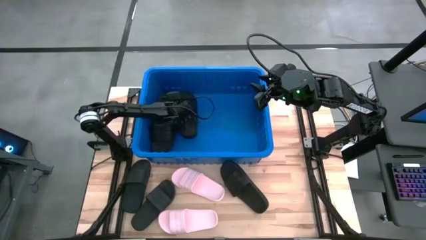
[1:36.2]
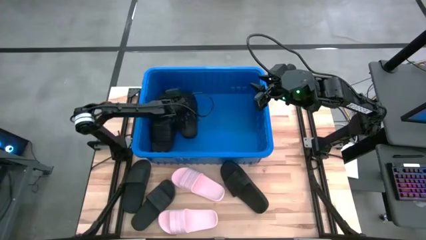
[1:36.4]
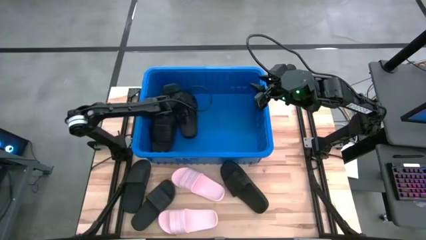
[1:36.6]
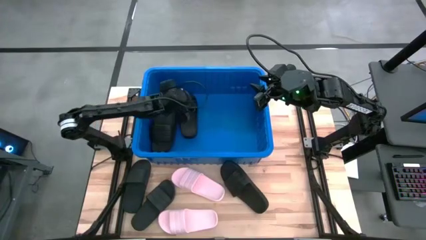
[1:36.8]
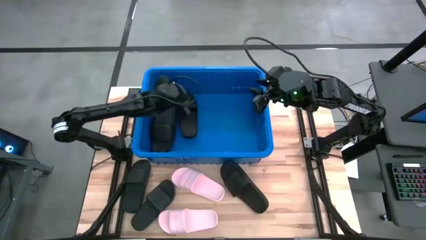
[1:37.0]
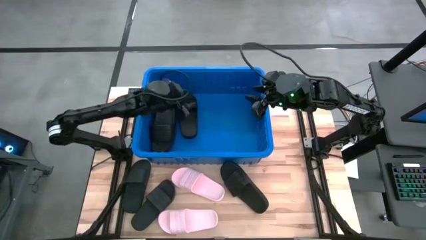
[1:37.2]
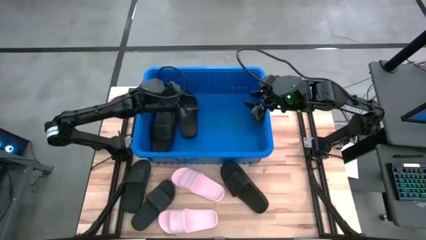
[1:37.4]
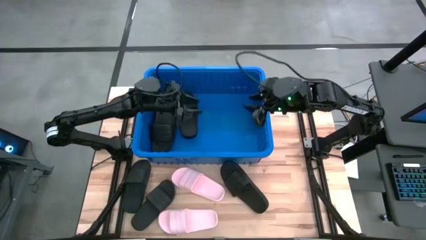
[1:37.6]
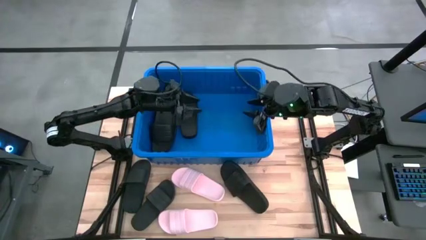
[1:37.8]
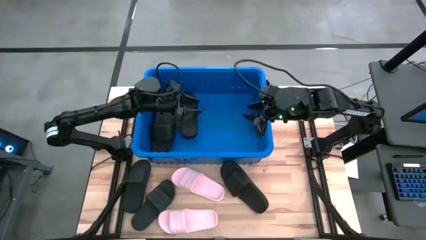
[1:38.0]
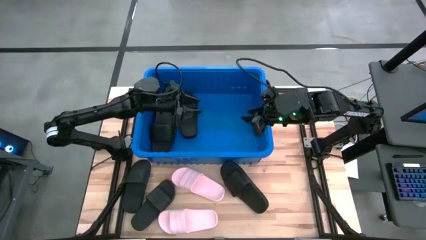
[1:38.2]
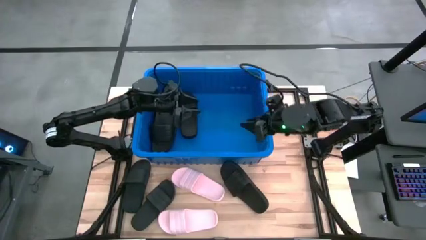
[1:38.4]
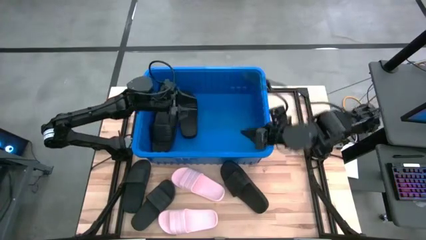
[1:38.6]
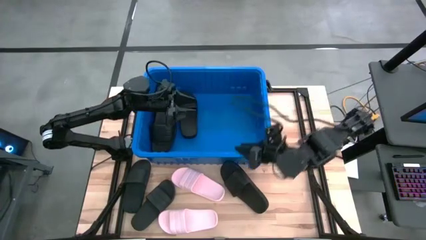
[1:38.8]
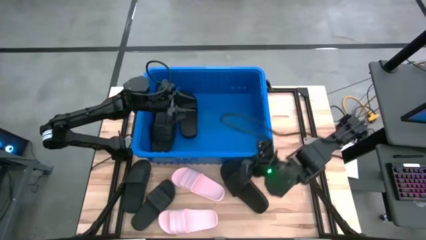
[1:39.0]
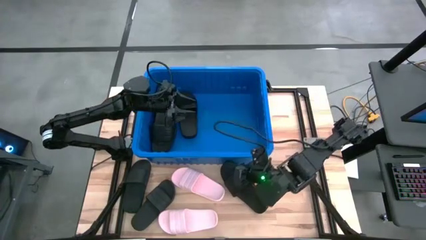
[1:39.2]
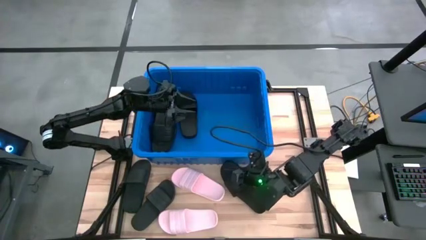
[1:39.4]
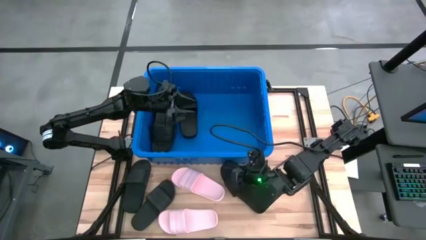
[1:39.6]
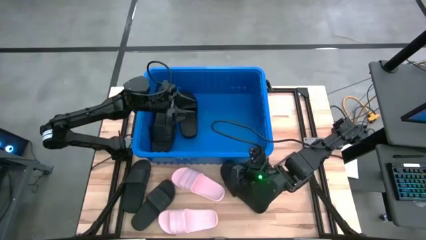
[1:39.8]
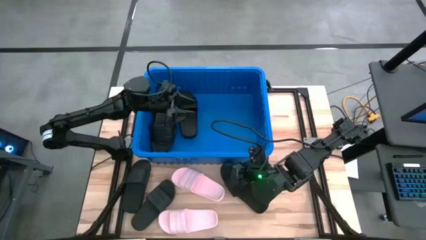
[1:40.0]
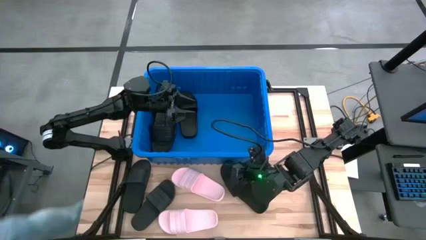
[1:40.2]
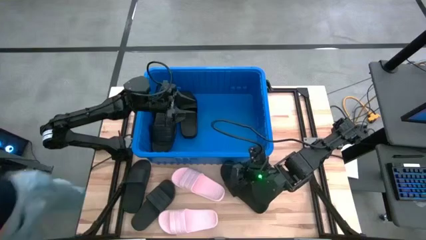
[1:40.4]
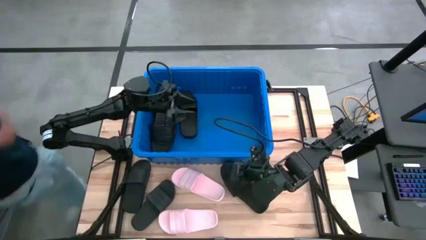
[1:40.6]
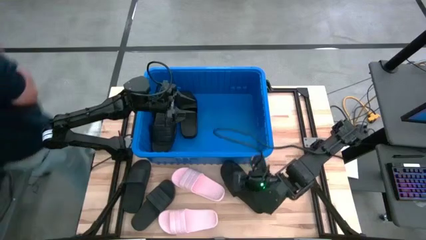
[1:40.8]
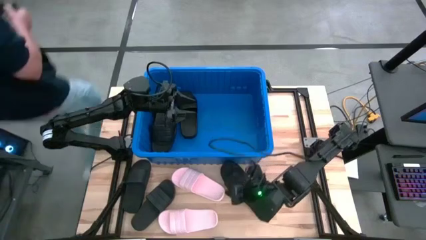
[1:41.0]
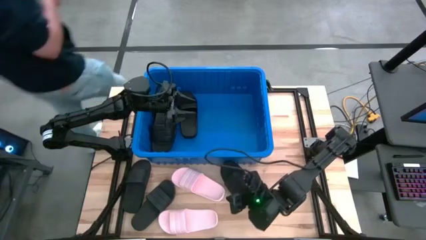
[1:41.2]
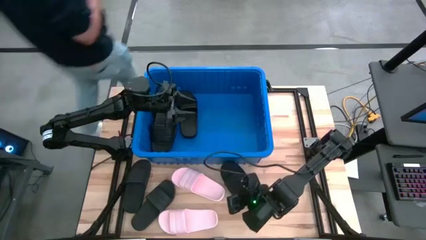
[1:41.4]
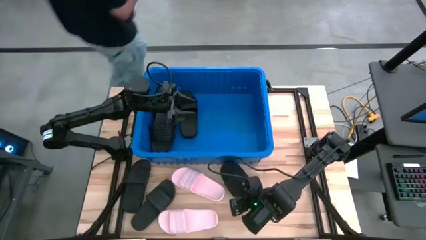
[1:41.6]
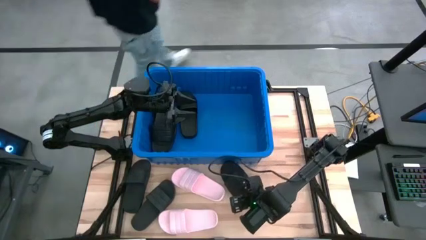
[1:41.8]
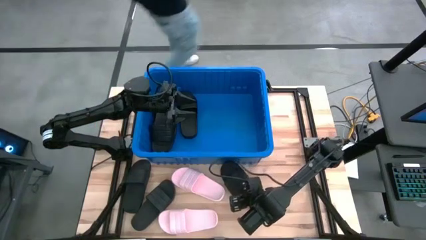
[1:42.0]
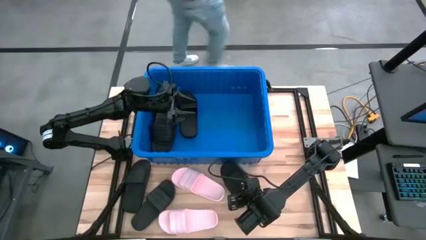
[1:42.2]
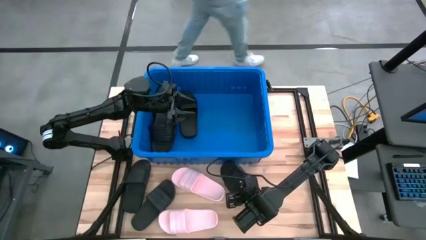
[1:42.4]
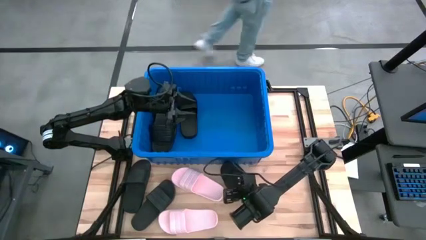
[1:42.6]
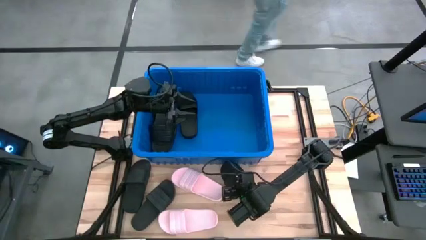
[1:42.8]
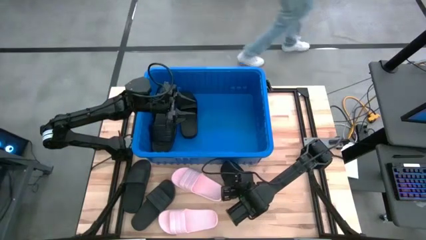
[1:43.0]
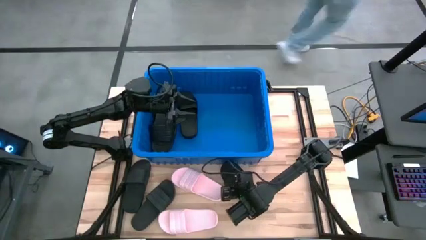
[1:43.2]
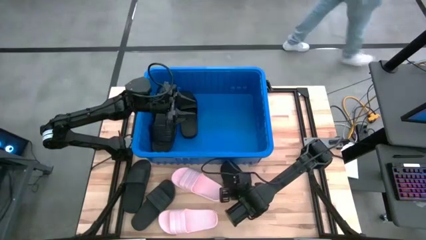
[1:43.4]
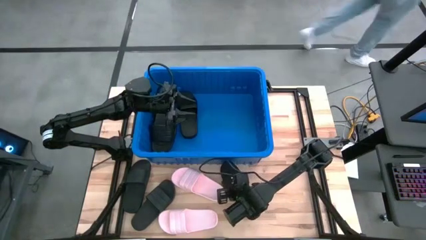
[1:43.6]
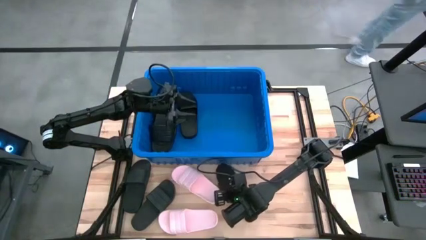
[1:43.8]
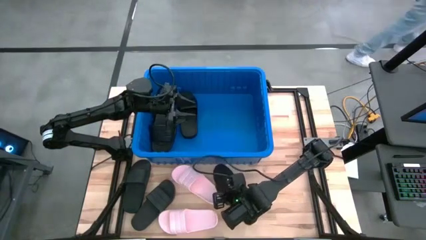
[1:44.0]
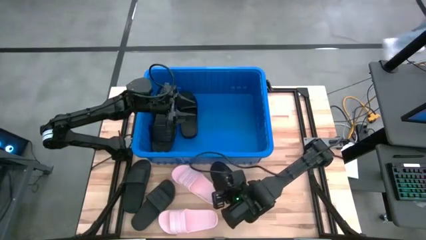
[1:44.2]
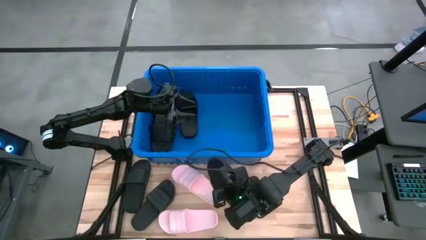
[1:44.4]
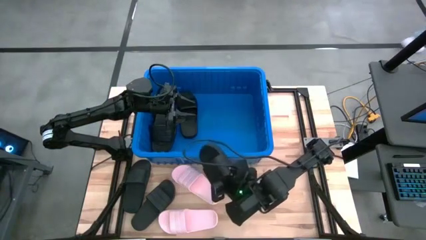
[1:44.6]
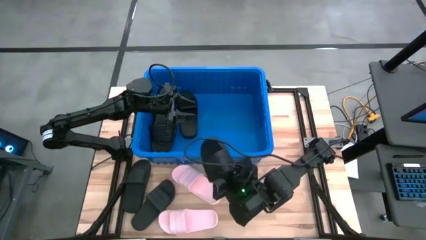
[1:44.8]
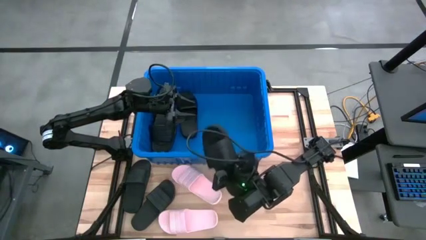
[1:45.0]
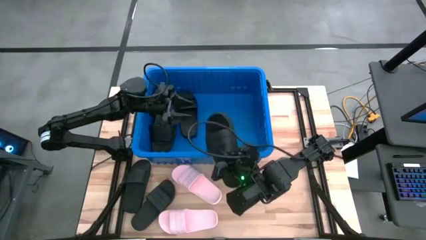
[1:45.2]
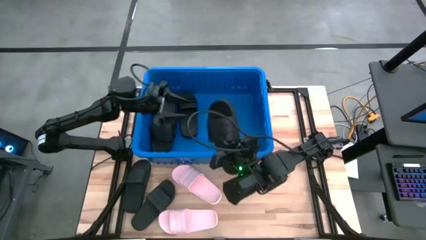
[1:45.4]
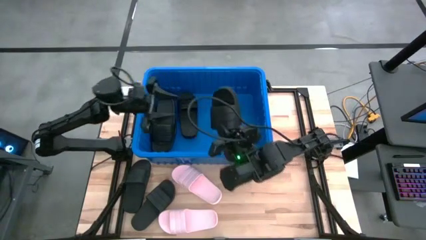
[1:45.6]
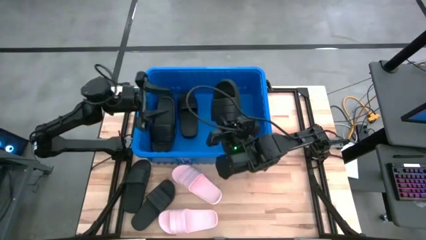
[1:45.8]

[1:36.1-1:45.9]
Task: Pick and place slides into bin
Stack the right black slide on top of the black slide into the blue container

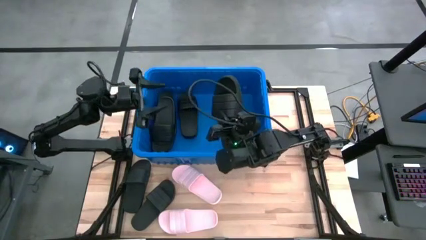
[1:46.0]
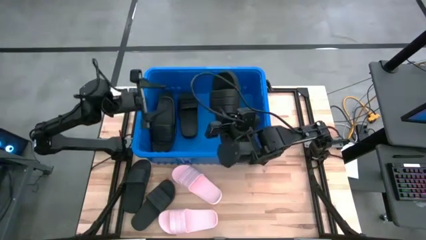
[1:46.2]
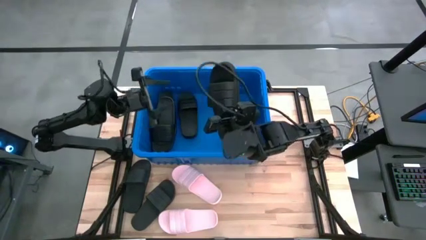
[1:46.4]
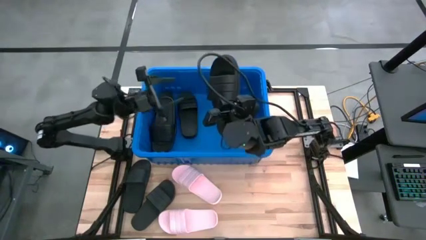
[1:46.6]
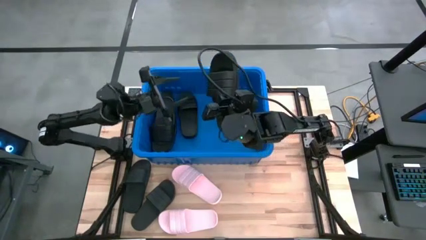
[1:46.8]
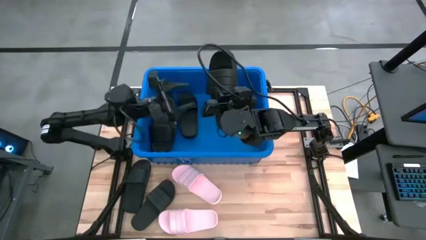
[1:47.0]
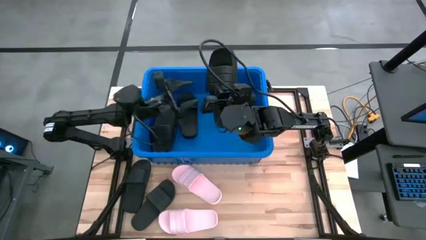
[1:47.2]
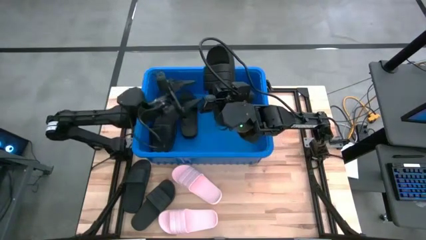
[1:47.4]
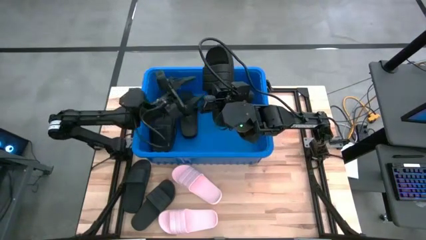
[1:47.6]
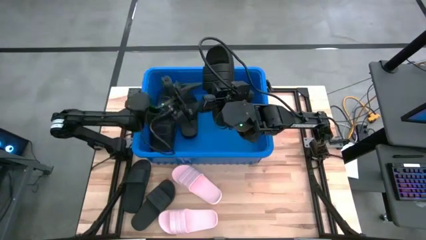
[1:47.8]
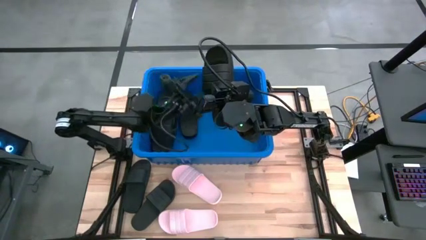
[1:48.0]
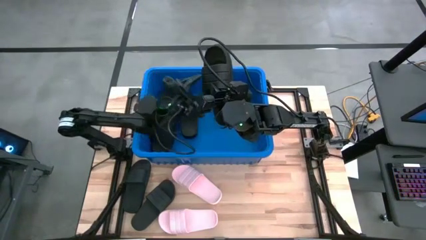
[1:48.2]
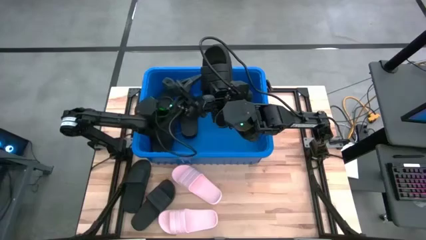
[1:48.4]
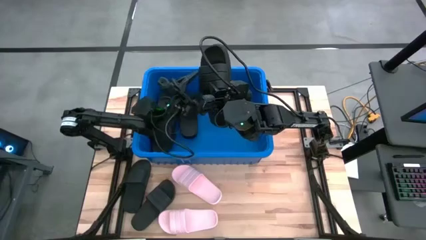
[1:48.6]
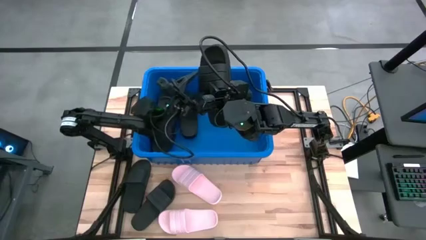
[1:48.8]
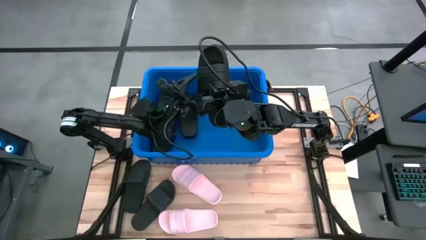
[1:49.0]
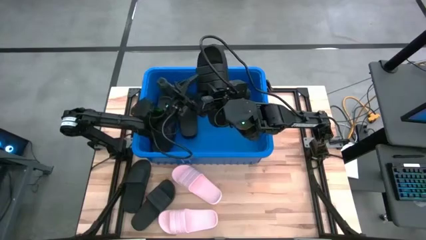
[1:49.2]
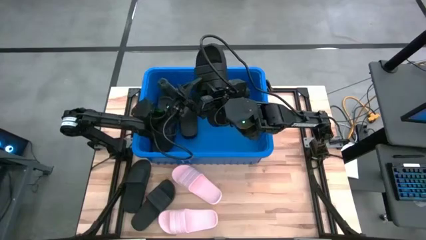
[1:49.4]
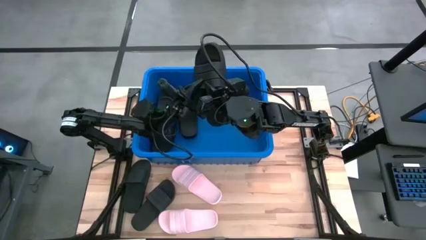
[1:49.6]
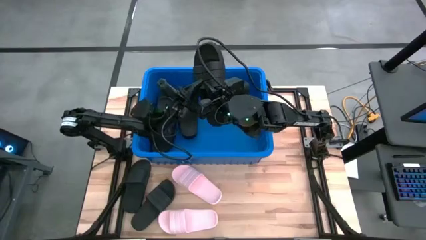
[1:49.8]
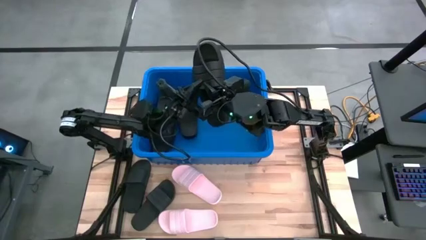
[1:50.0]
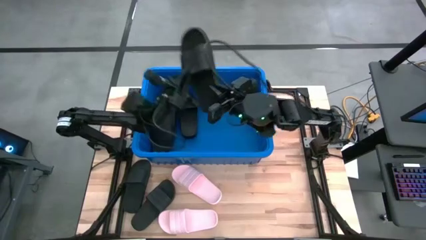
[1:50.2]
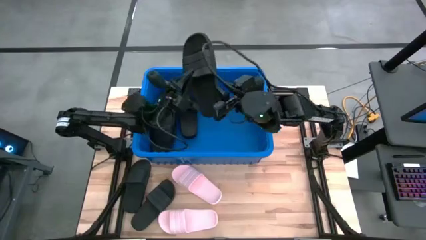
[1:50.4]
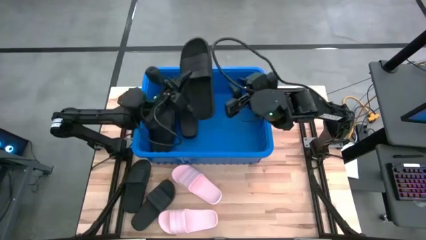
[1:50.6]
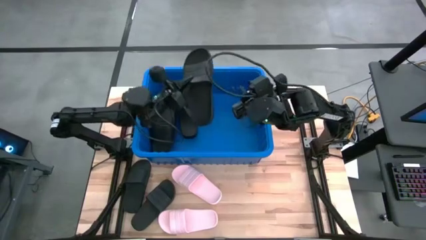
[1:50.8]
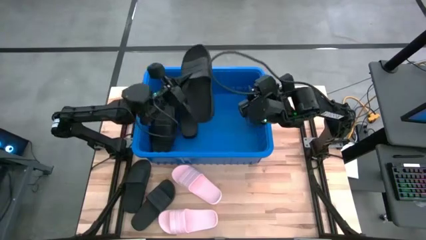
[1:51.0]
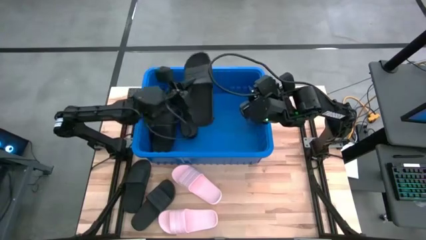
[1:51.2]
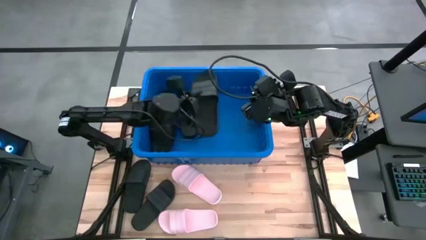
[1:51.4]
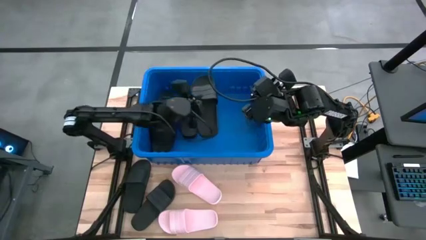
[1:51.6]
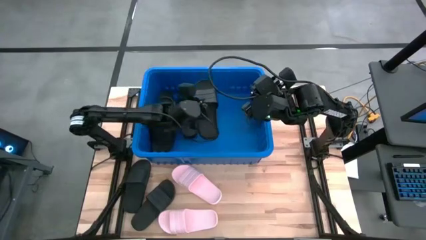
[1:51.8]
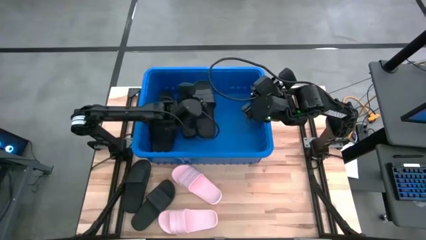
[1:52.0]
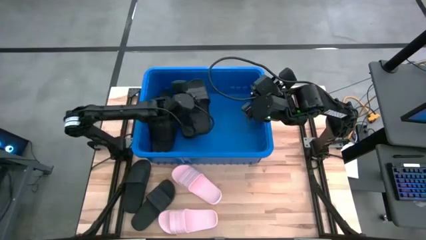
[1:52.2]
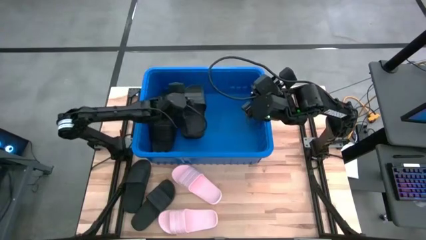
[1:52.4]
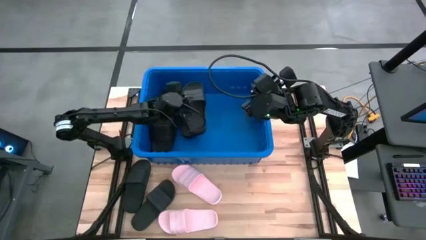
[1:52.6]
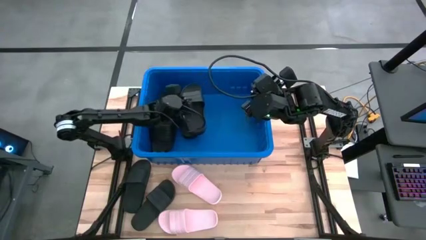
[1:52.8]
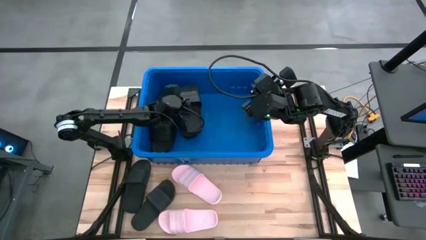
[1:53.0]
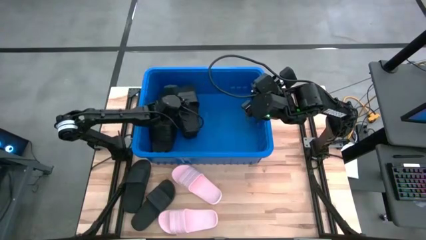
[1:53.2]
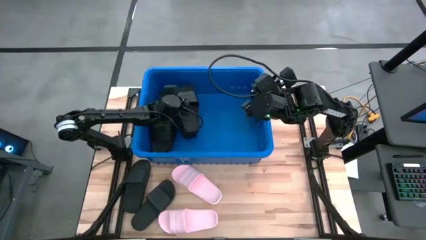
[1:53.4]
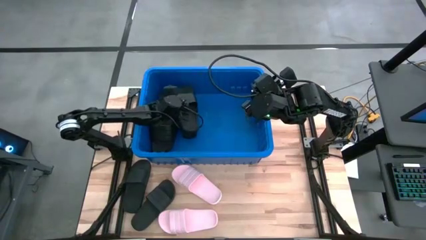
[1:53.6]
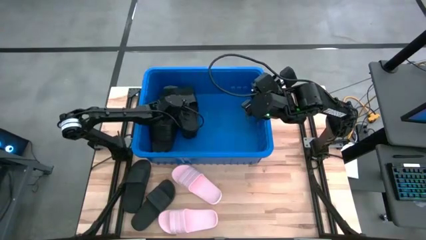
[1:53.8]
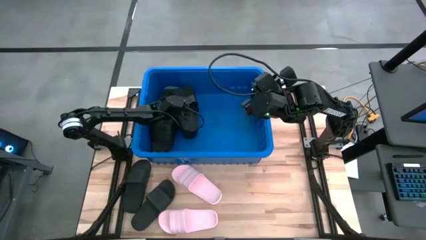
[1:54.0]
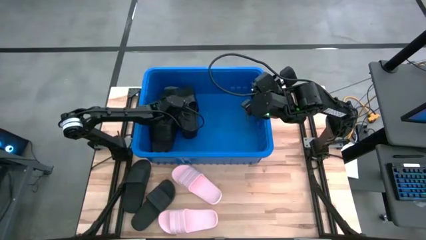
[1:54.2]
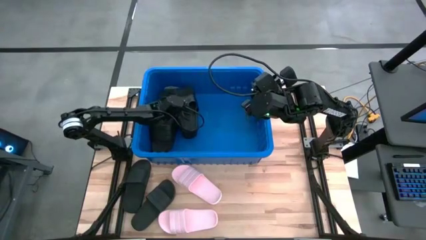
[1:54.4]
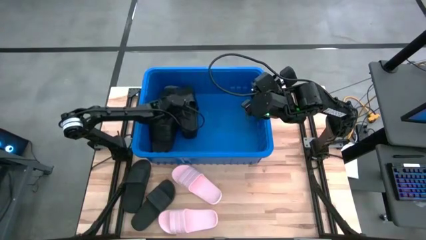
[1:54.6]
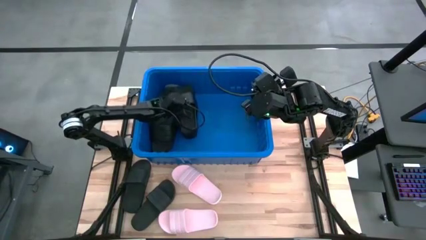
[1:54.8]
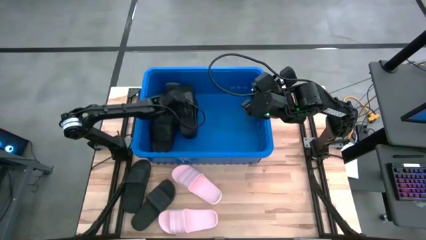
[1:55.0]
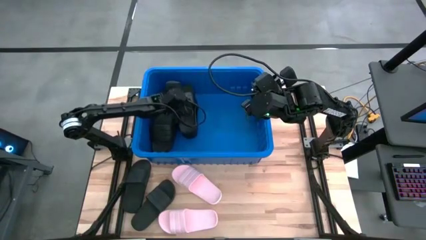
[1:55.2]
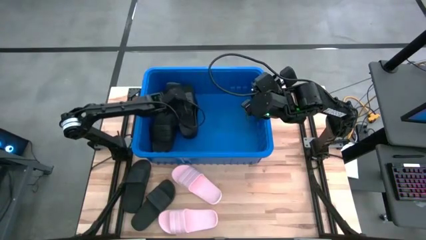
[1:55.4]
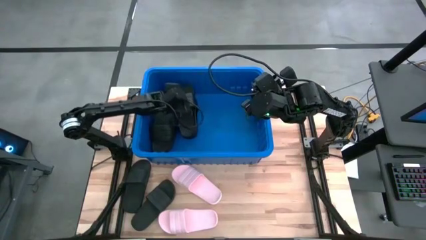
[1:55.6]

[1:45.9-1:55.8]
Stack the right black slide on top of the black slide into the blue container
